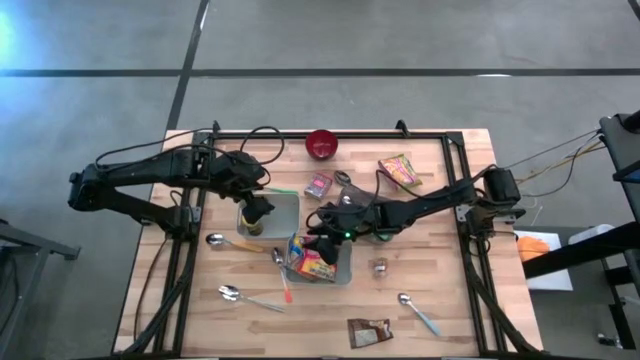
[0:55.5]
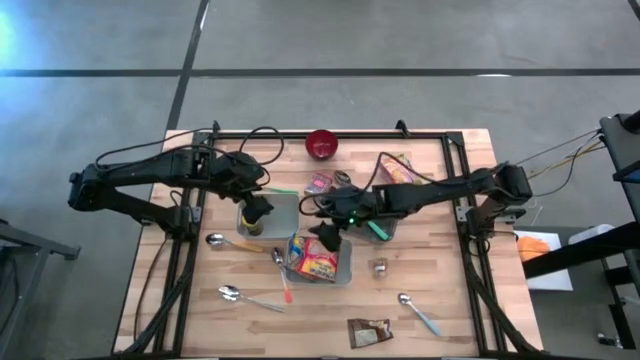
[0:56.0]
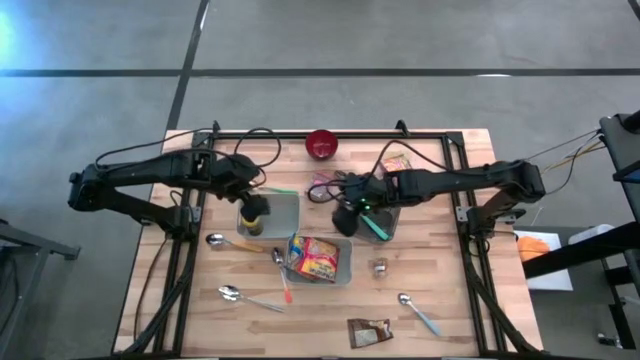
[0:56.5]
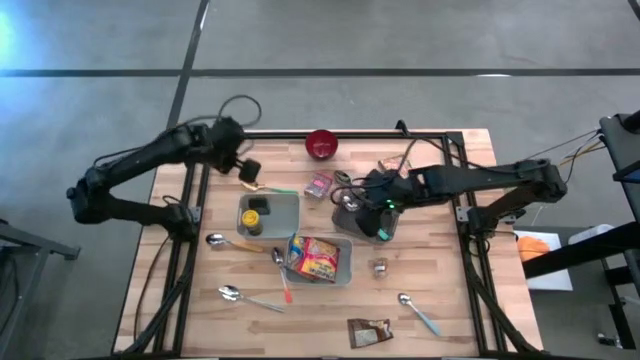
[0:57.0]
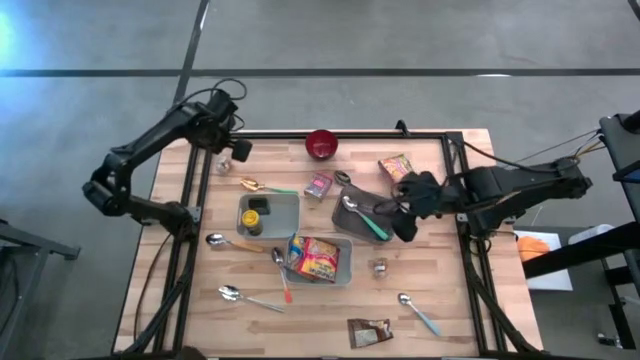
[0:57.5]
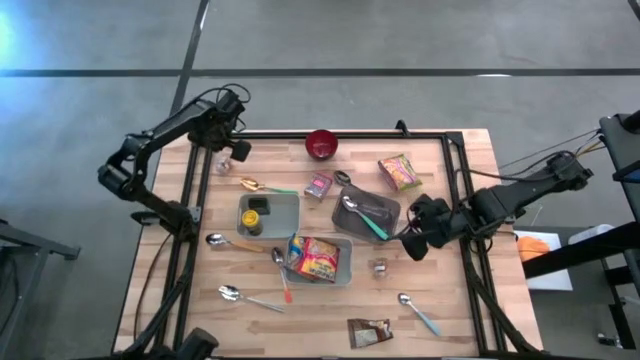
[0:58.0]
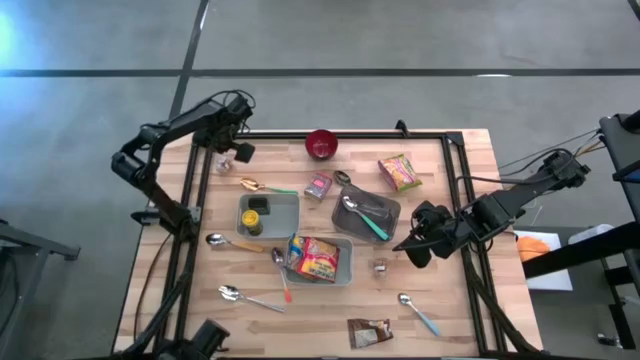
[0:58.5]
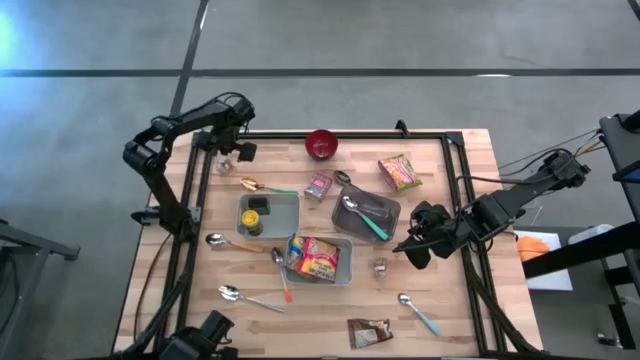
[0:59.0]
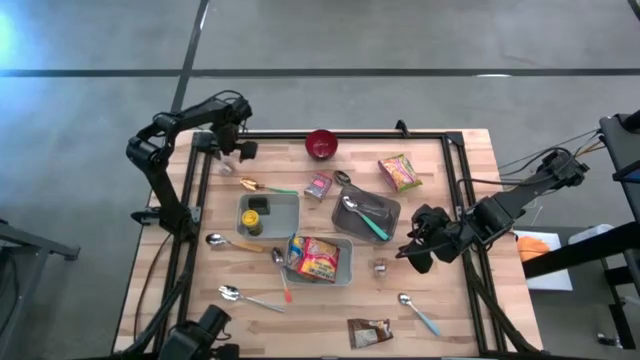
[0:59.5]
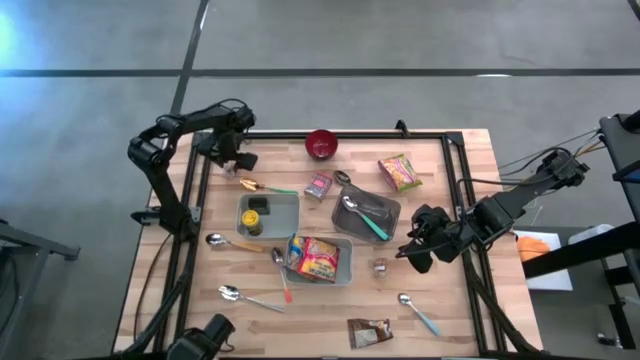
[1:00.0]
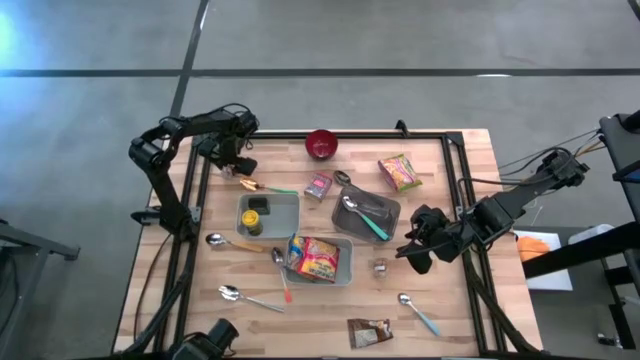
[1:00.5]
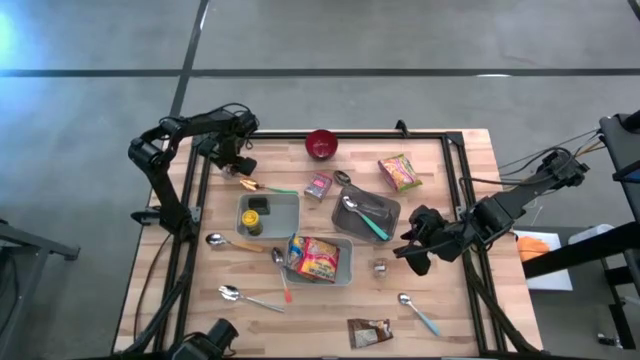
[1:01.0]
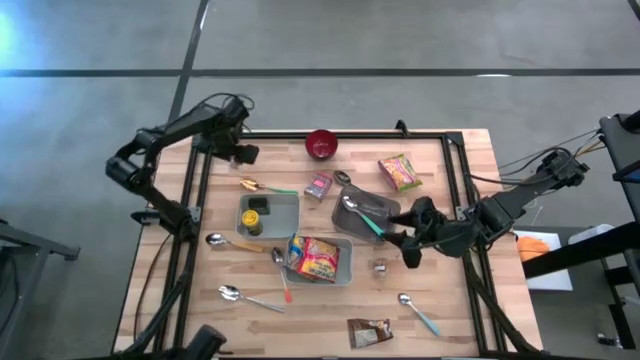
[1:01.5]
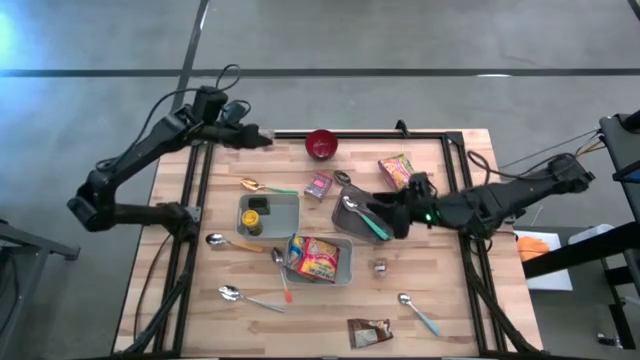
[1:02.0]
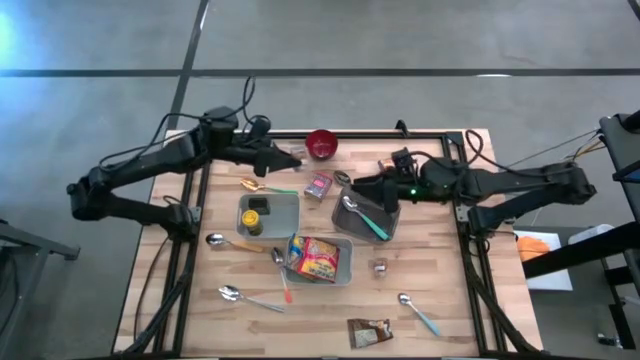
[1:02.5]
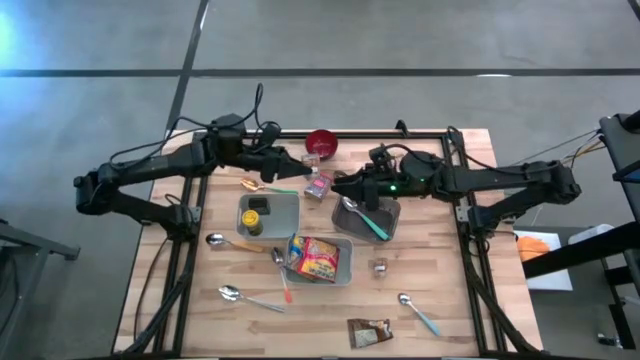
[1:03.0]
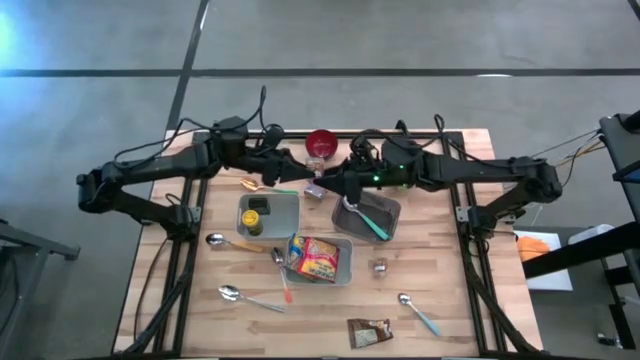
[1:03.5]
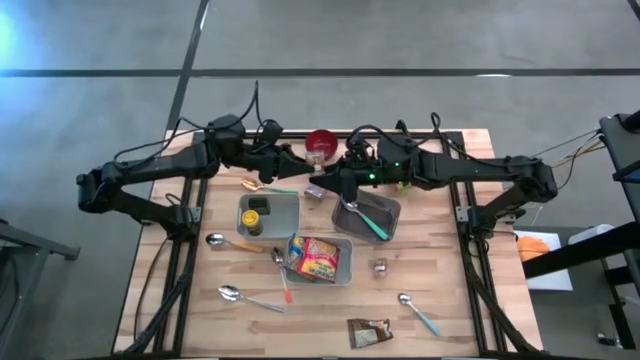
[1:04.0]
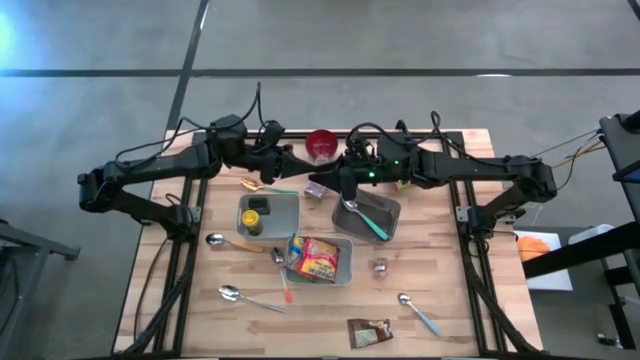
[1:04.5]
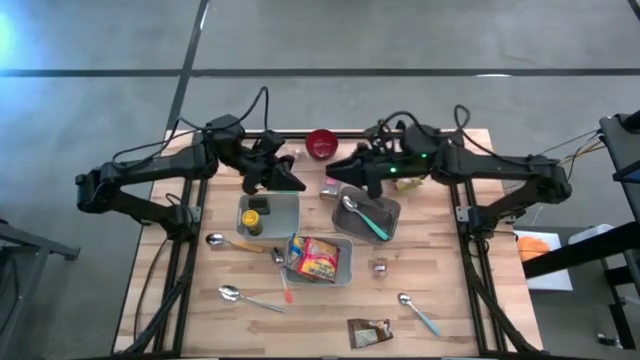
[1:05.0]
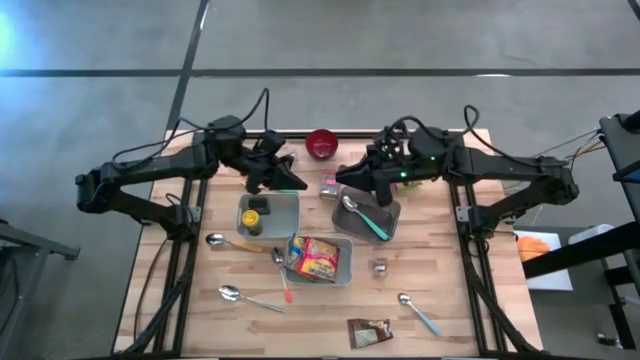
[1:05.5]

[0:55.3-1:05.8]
Put the top brown seasoning bottle into the top gray bin

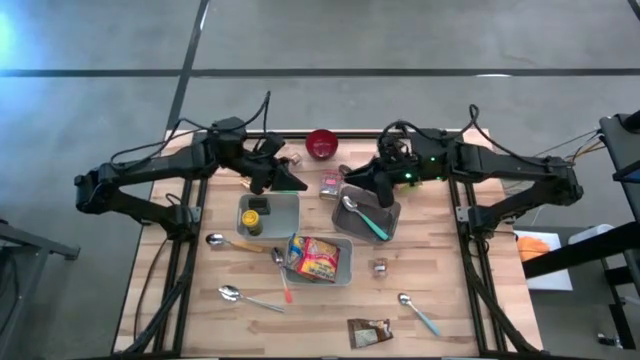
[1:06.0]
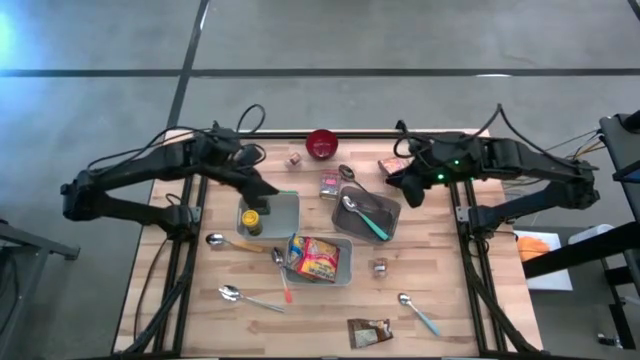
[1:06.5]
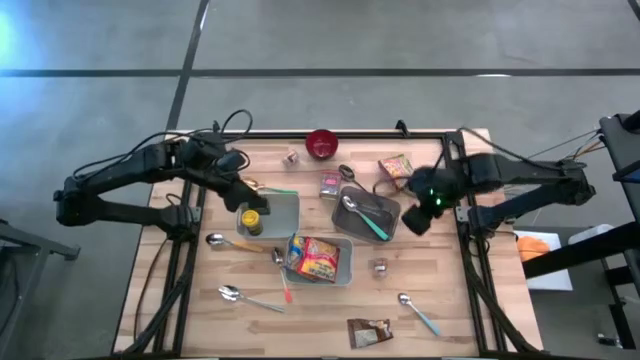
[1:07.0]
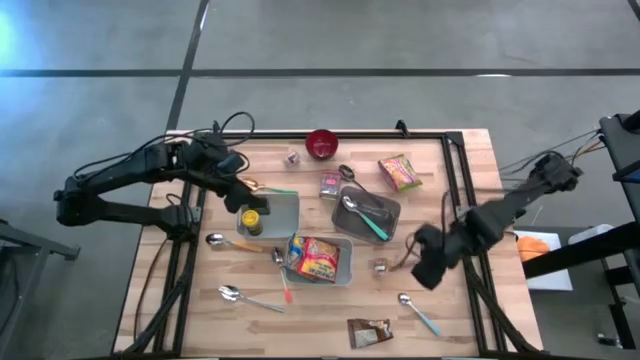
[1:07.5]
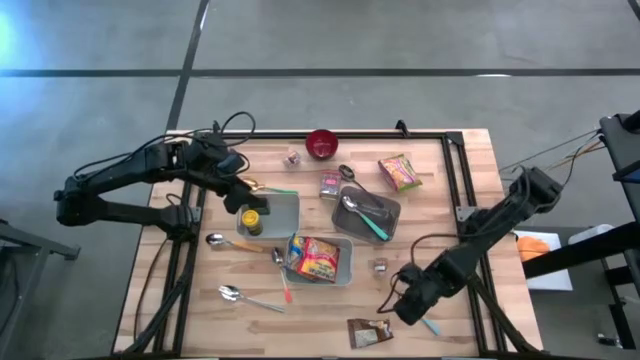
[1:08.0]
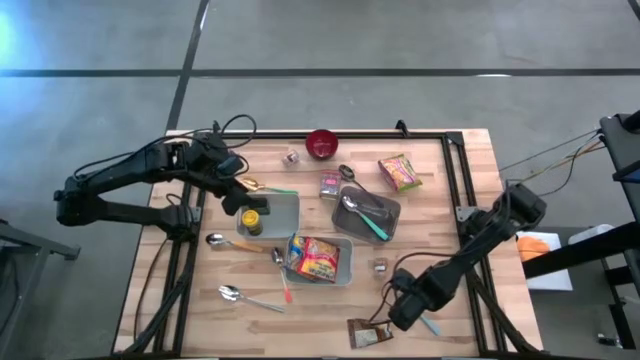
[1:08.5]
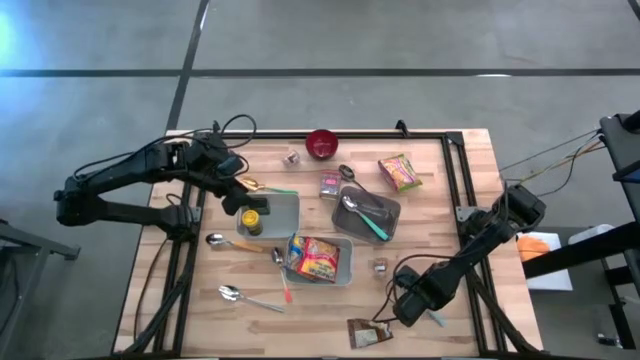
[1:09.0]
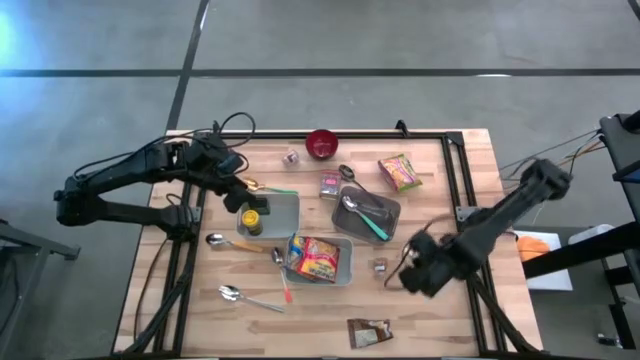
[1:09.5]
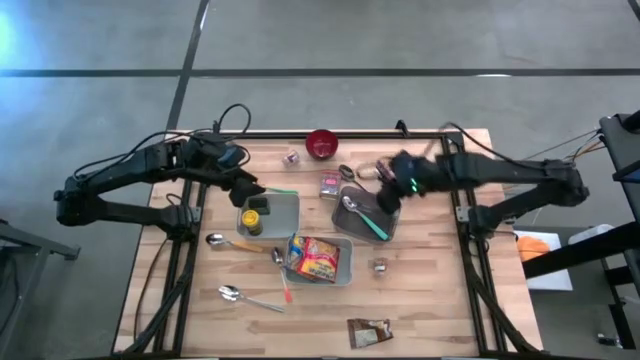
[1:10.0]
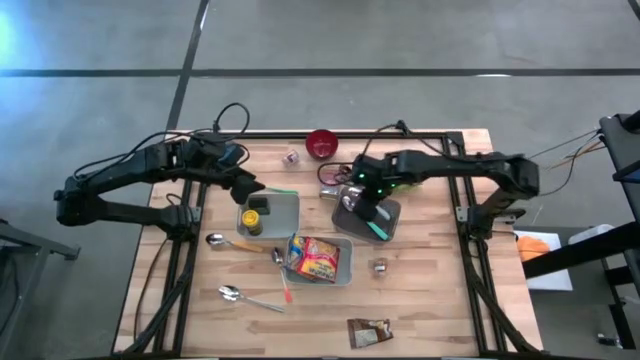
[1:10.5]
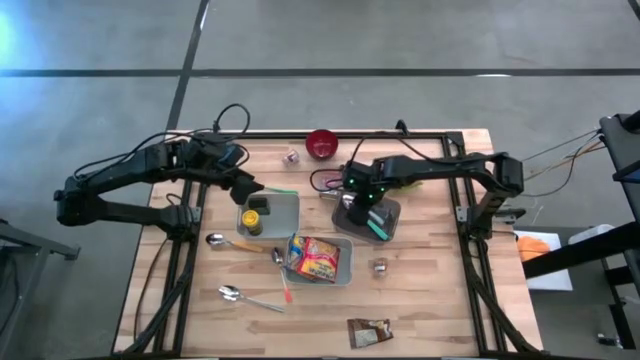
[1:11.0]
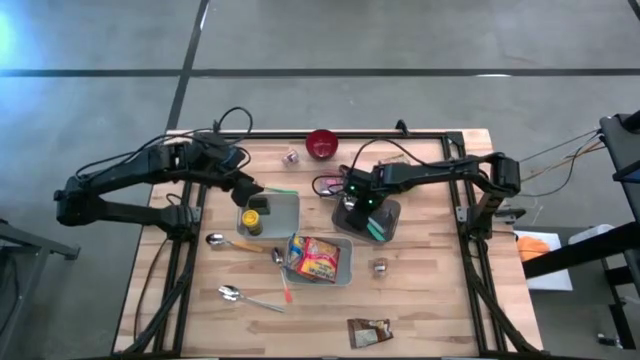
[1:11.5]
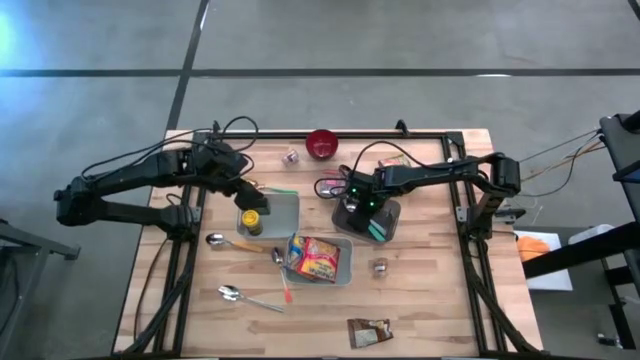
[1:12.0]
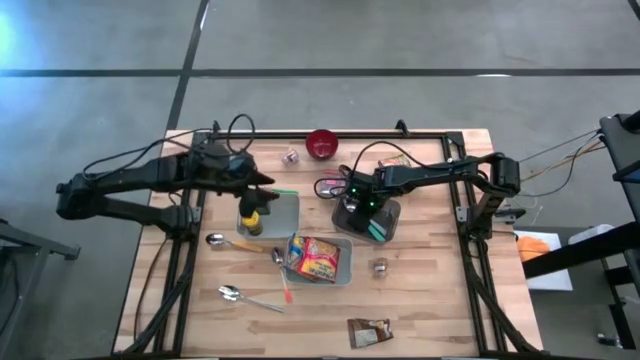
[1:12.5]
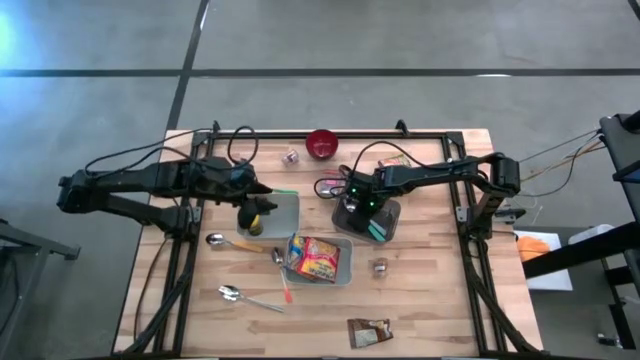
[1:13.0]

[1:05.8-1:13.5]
Put the light blue spoon into the black bin
